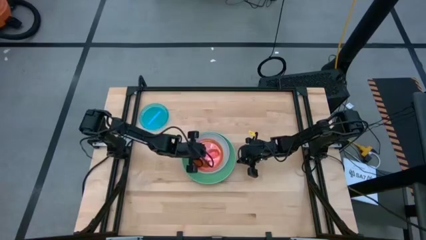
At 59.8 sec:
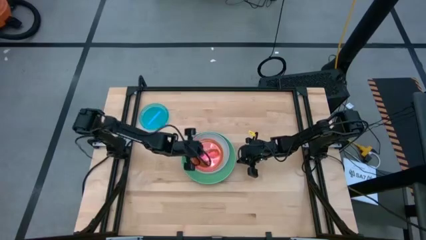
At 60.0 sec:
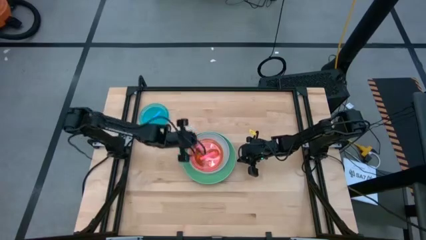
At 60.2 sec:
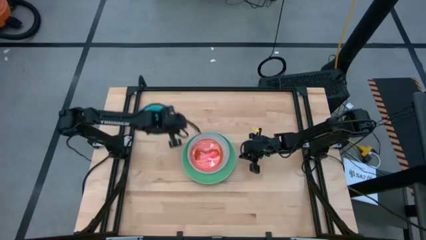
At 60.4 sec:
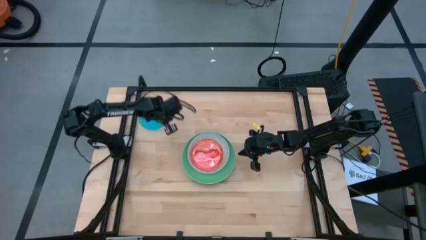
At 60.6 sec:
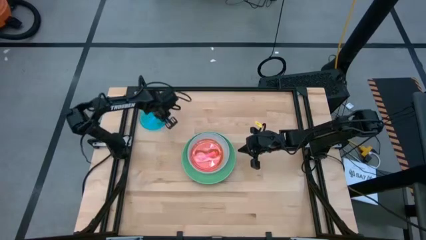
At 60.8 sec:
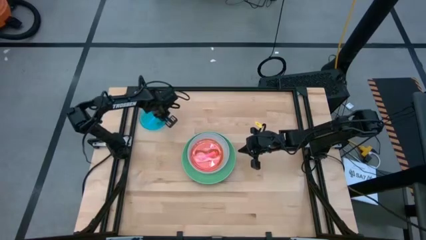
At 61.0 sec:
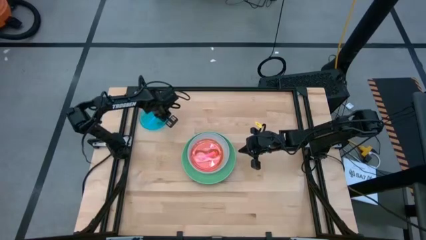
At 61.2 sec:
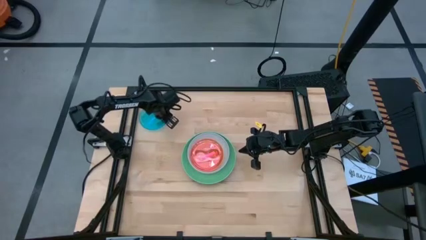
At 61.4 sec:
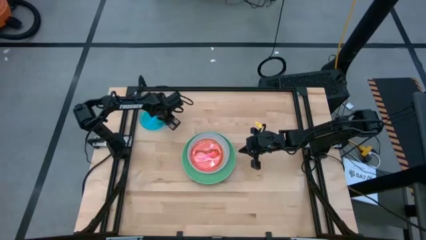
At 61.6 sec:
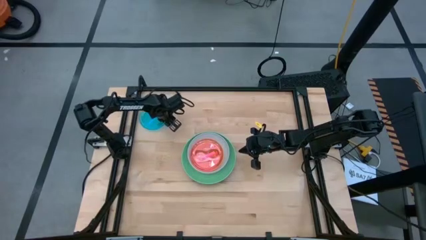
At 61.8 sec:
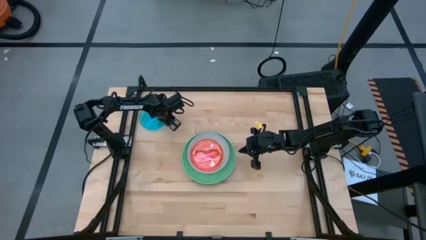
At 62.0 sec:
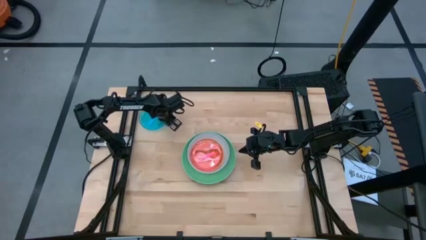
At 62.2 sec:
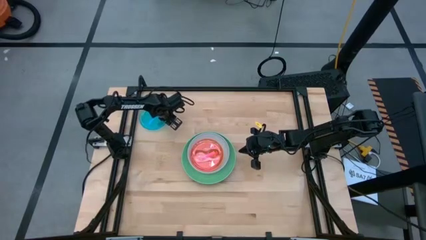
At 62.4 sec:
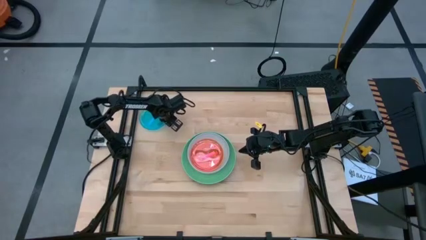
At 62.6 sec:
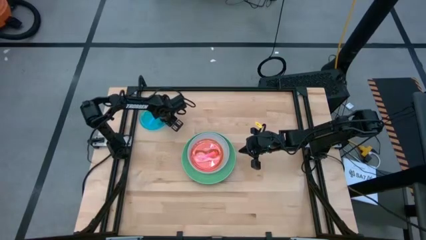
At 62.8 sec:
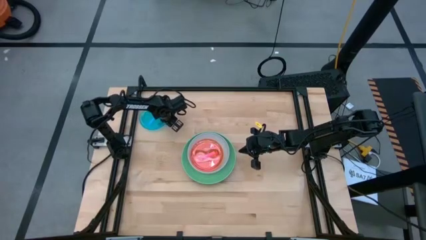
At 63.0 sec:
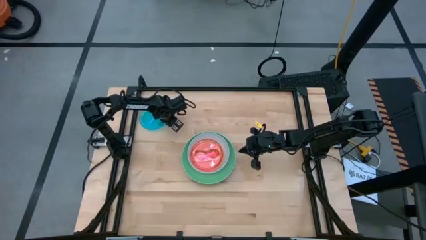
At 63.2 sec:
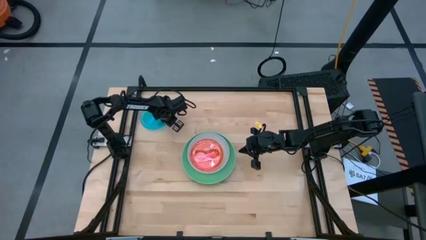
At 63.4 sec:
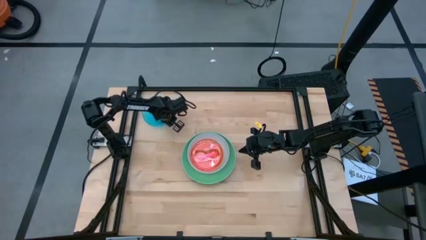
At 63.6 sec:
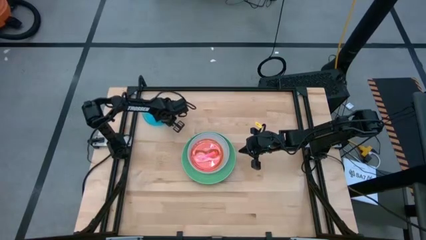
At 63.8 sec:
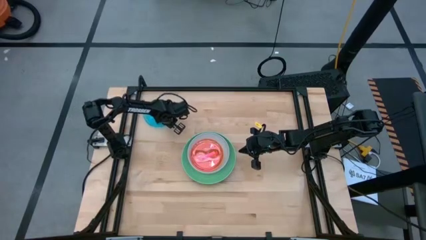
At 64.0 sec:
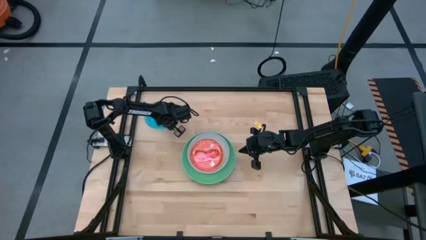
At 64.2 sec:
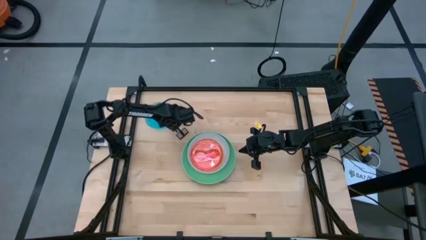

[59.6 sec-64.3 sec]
Task: Stack plastic plates
Stack the blue transparent plate on the pink transparent plate

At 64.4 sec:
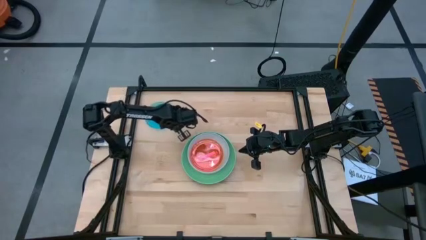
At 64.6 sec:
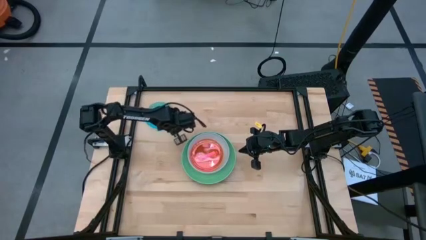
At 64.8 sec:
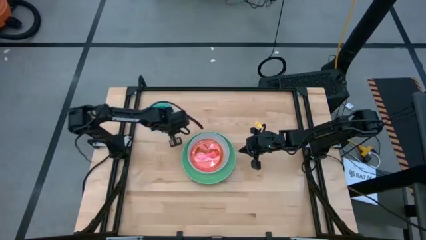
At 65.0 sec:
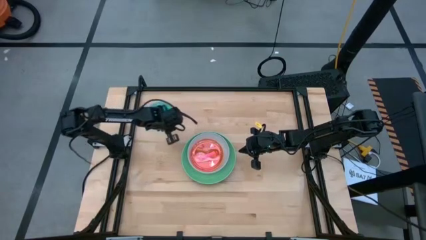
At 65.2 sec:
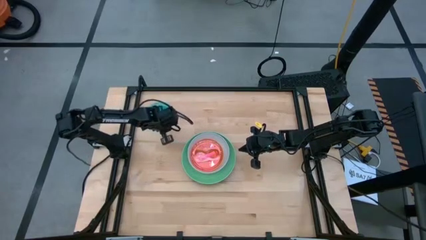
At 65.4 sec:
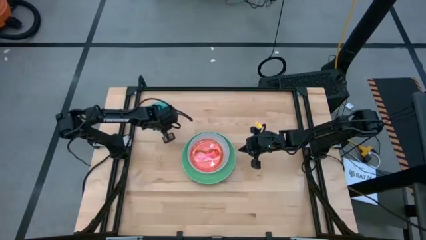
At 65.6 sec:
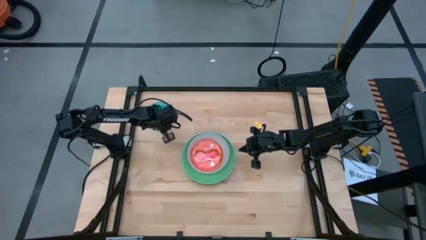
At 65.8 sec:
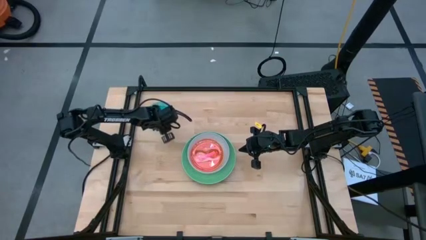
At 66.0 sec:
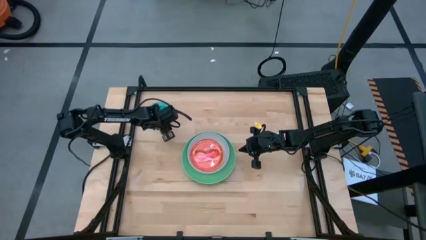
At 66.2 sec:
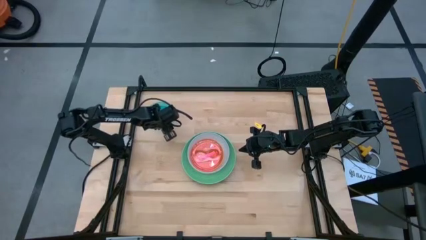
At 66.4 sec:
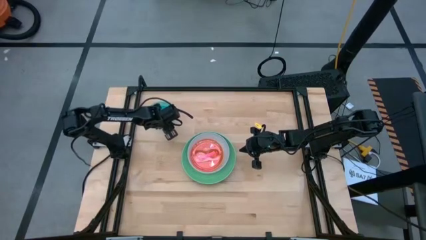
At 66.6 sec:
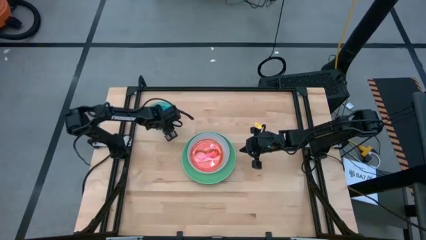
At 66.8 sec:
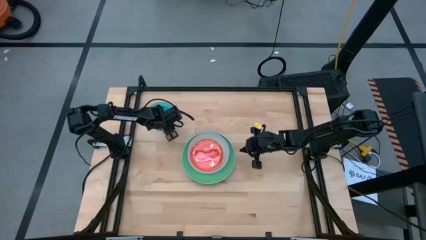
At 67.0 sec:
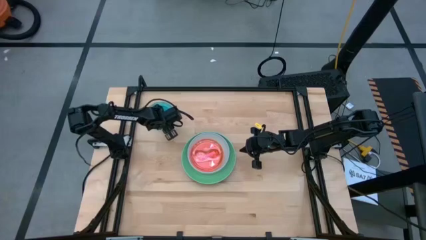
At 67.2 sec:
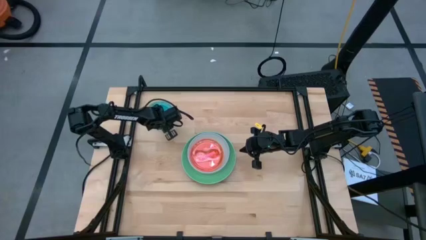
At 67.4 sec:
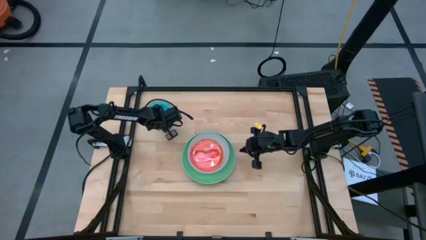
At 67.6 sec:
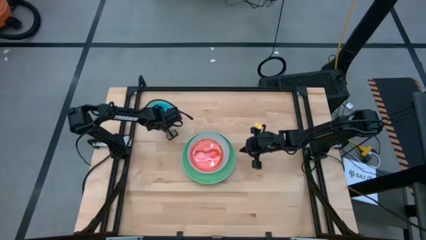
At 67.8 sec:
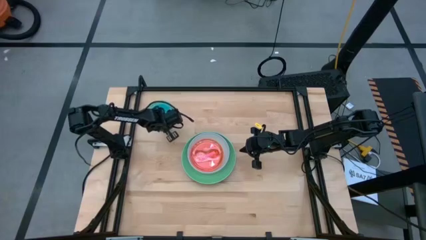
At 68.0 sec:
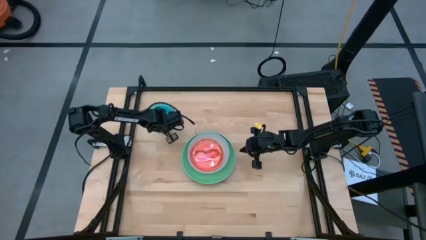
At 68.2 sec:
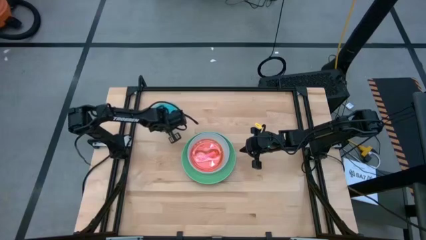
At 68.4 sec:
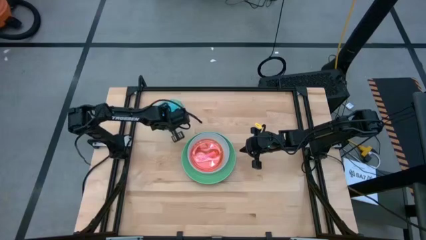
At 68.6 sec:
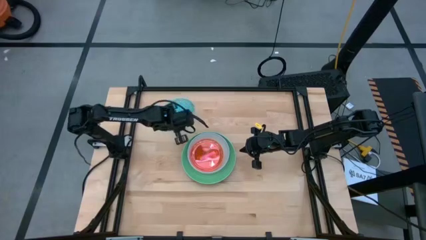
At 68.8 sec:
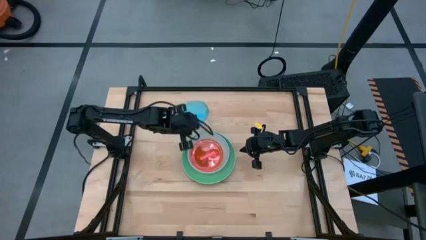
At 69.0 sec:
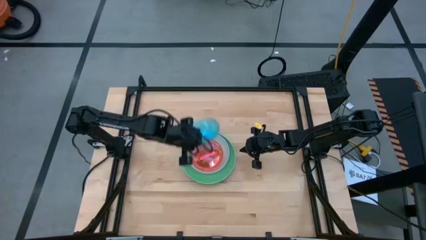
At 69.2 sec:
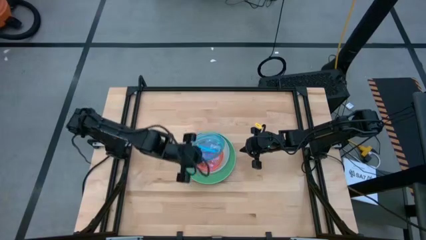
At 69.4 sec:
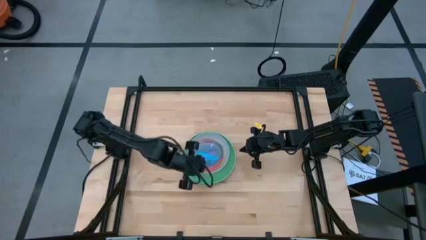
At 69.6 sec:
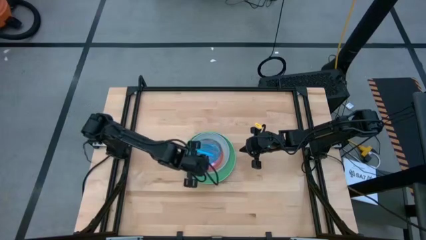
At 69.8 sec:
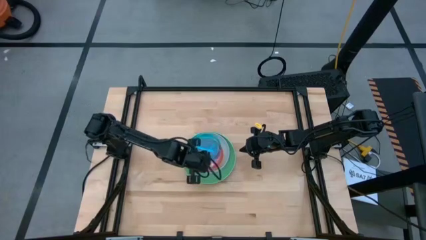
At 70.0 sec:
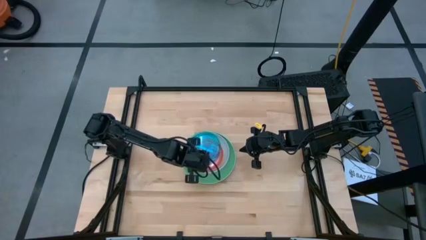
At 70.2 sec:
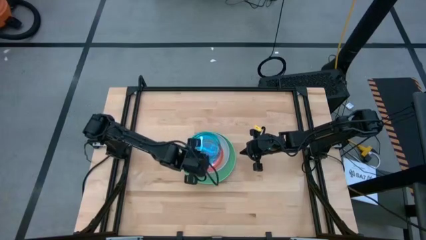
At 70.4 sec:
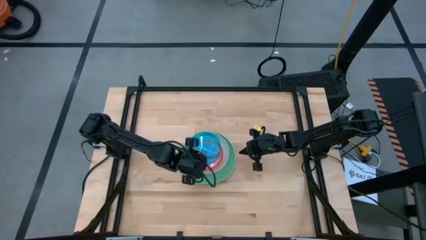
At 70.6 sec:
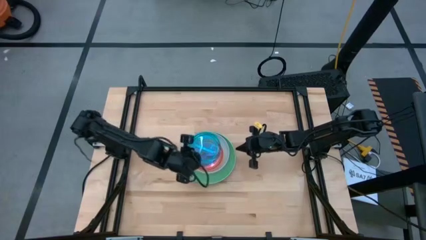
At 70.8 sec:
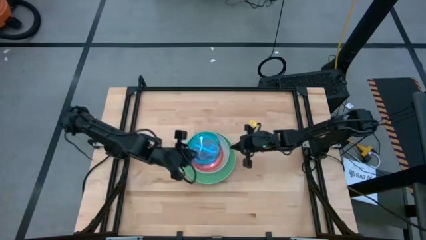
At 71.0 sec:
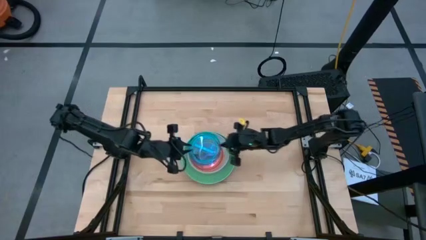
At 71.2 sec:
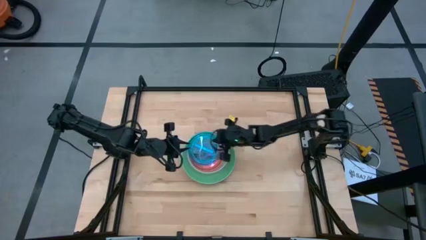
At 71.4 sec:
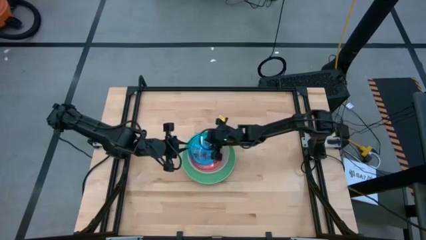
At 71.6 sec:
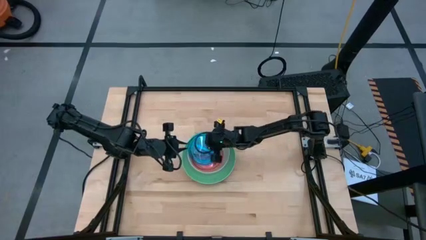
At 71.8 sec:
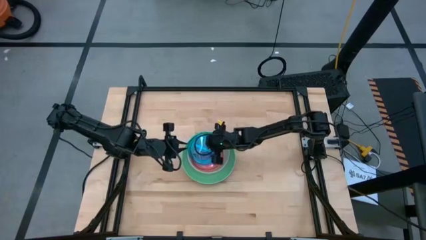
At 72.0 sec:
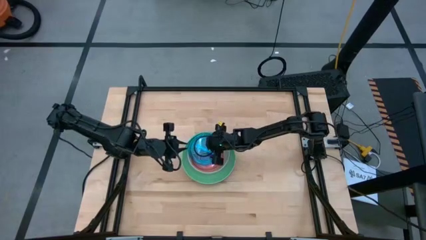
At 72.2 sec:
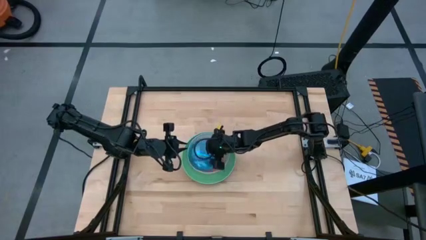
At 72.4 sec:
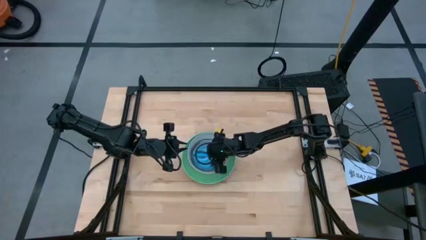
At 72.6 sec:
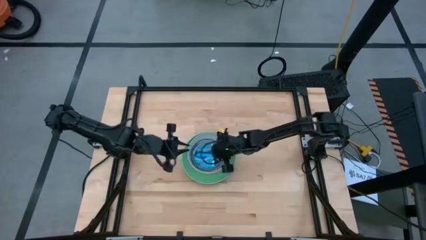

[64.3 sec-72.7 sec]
Stack the blue transparent plate on the pink transparent plate

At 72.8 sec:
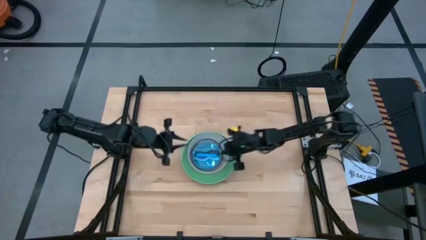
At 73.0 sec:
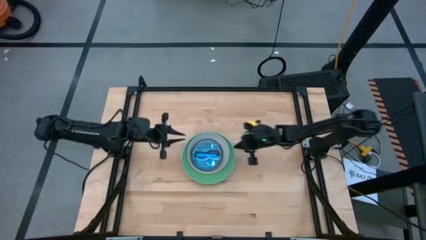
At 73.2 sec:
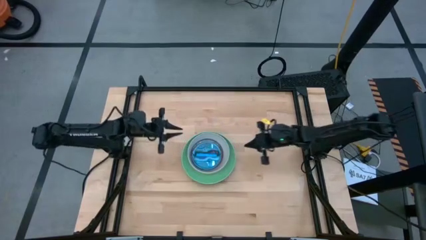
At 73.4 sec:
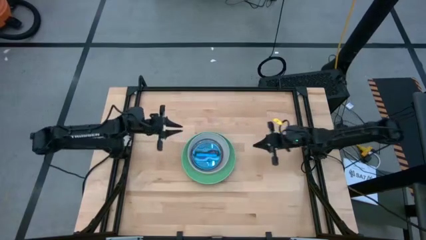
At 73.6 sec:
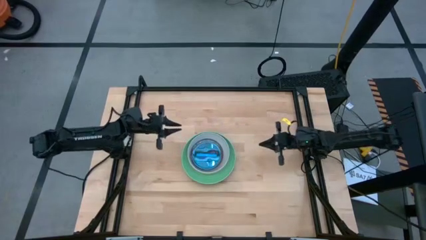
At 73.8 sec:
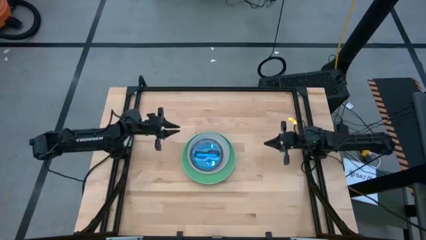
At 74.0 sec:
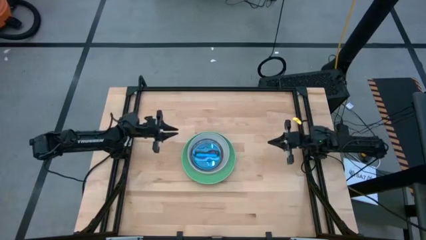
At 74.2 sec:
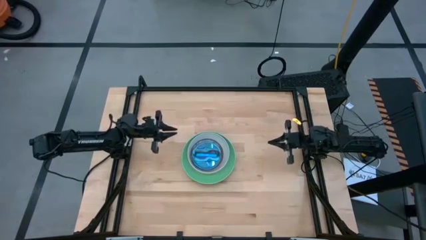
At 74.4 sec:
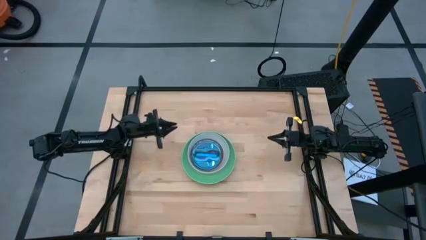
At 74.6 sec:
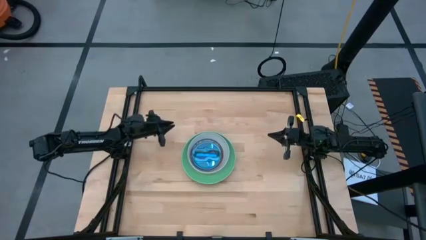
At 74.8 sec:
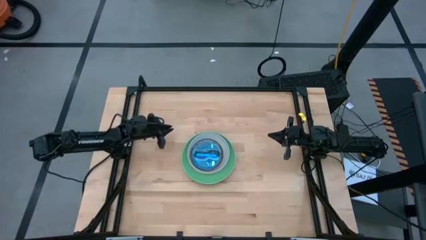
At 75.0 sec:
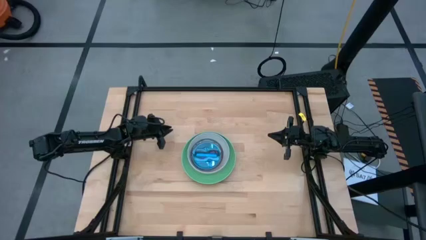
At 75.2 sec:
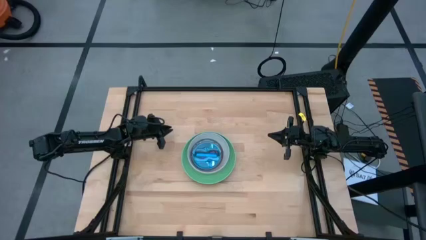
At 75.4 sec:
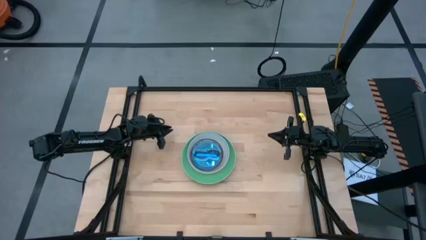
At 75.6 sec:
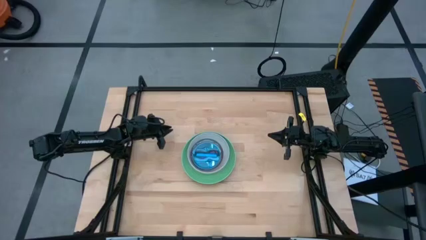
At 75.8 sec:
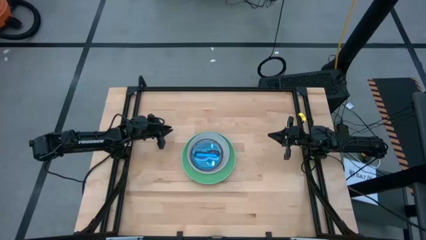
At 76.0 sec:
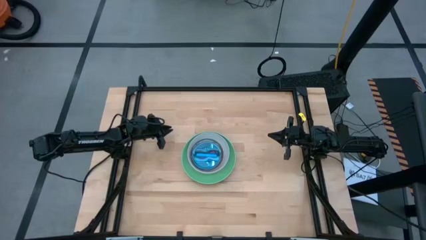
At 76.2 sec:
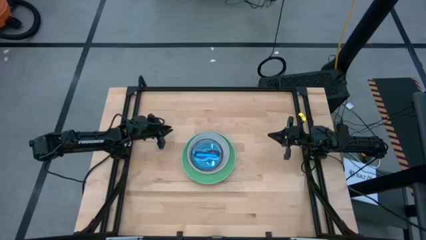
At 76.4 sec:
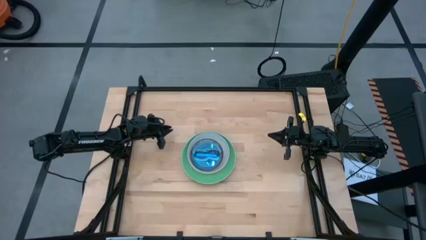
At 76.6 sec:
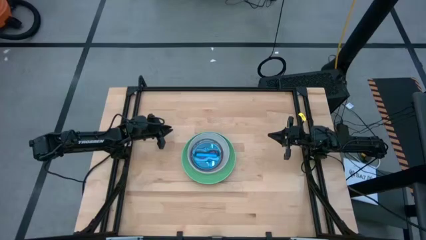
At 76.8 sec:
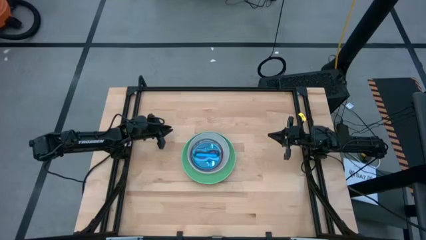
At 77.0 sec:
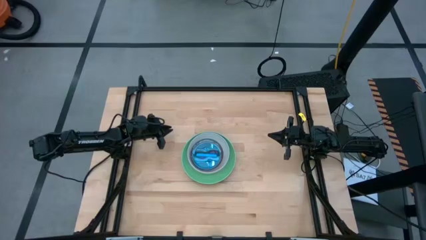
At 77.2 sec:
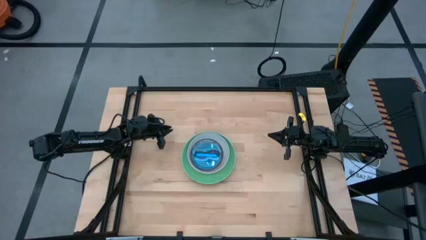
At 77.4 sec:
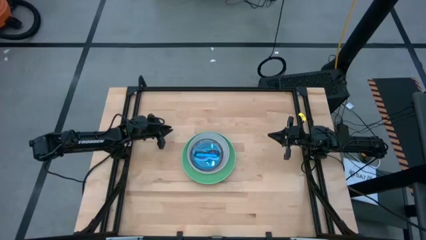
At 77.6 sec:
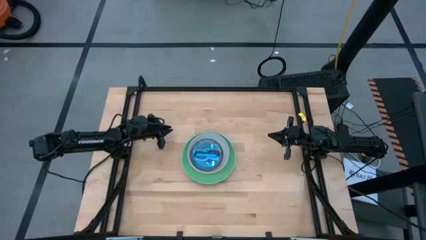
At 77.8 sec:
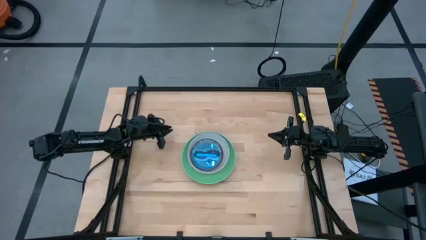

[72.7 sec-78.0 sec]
Return to Home Position
